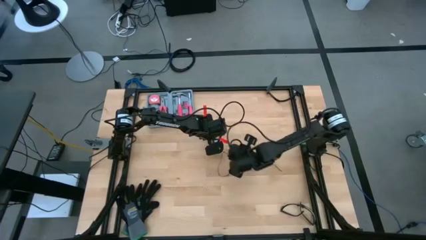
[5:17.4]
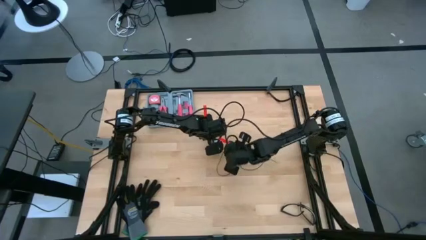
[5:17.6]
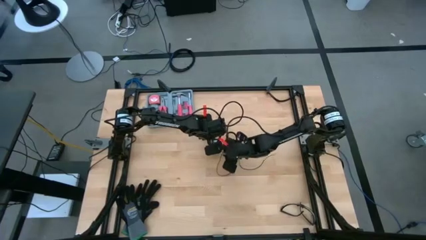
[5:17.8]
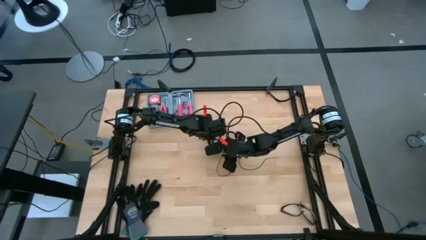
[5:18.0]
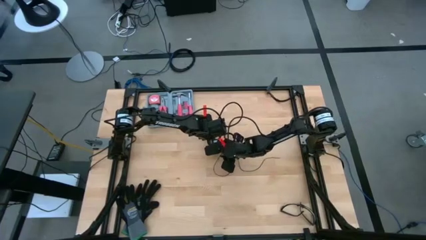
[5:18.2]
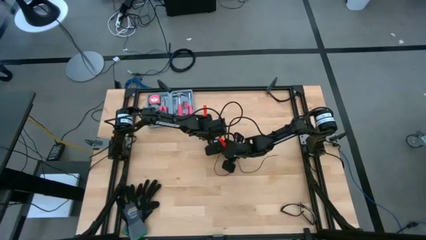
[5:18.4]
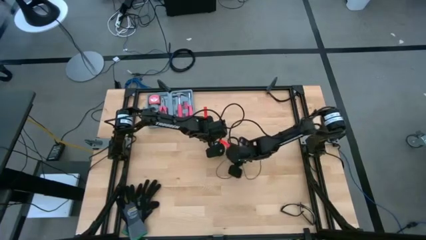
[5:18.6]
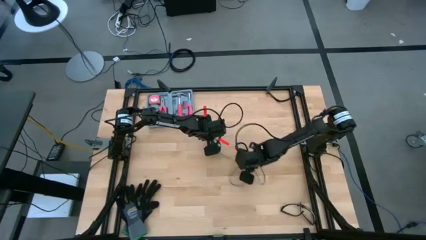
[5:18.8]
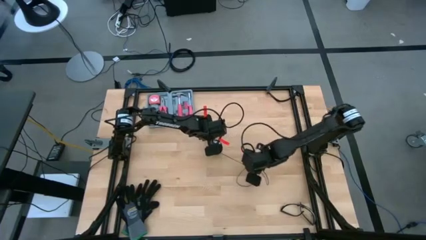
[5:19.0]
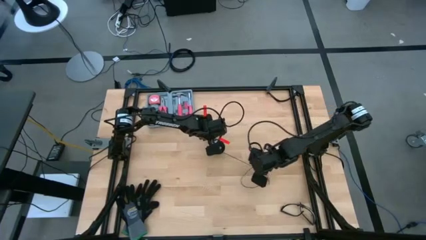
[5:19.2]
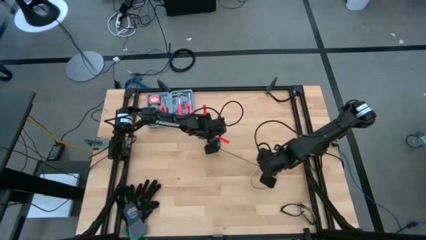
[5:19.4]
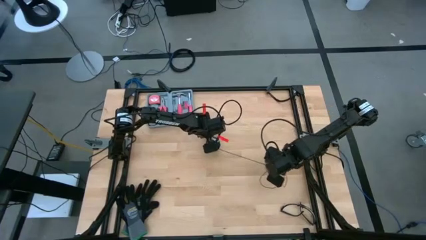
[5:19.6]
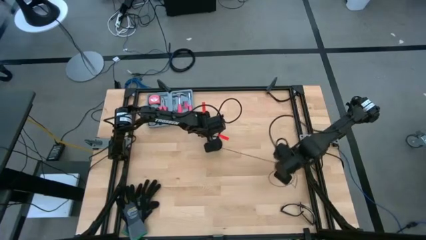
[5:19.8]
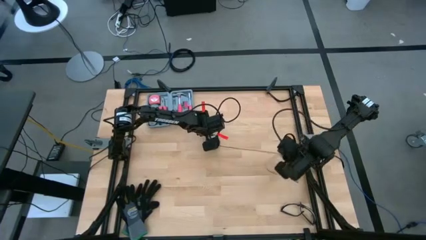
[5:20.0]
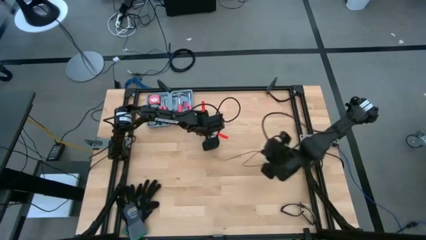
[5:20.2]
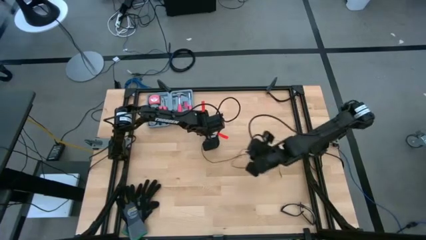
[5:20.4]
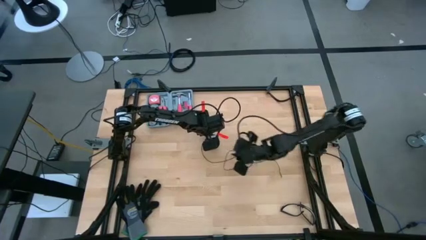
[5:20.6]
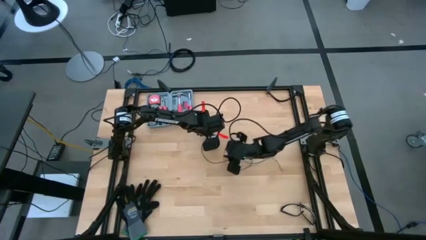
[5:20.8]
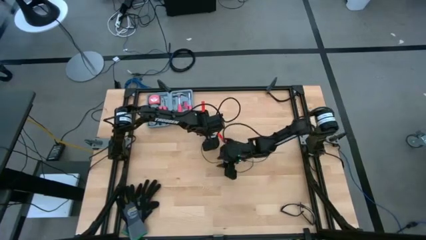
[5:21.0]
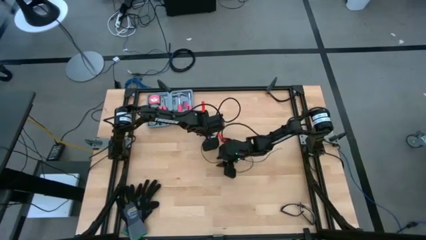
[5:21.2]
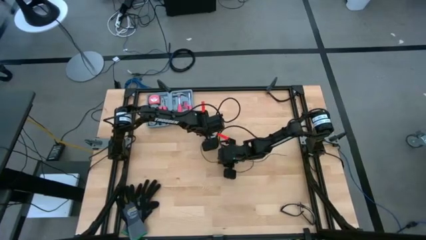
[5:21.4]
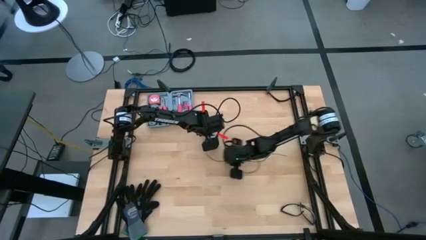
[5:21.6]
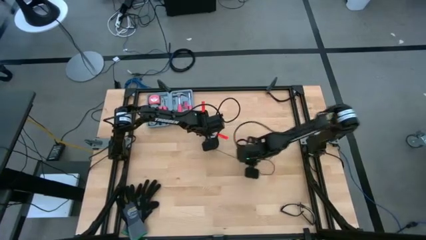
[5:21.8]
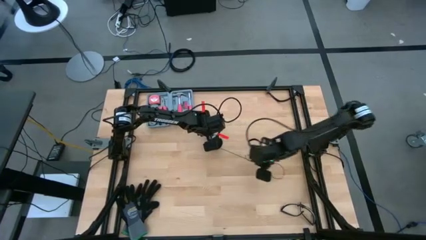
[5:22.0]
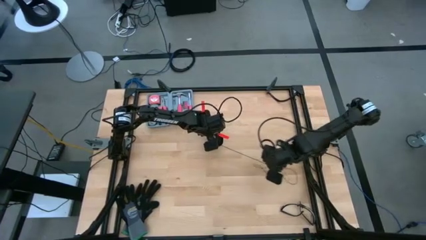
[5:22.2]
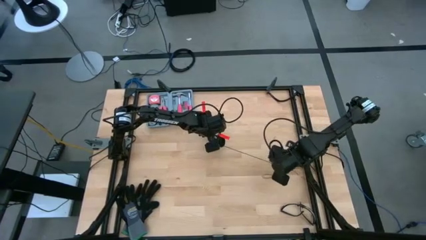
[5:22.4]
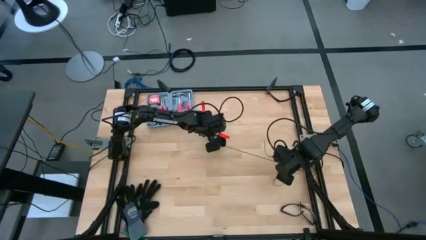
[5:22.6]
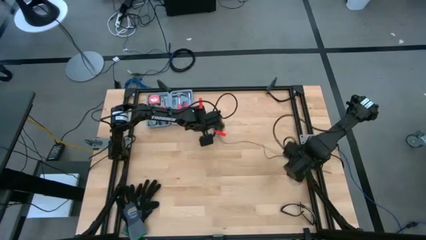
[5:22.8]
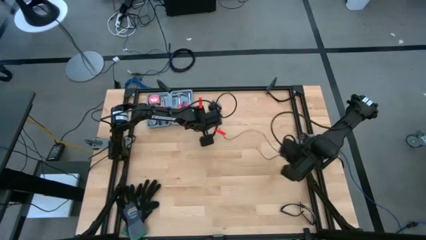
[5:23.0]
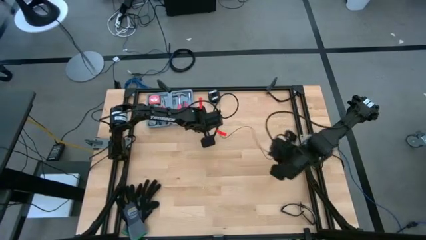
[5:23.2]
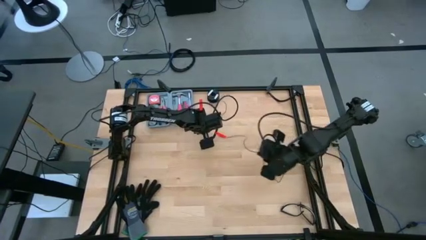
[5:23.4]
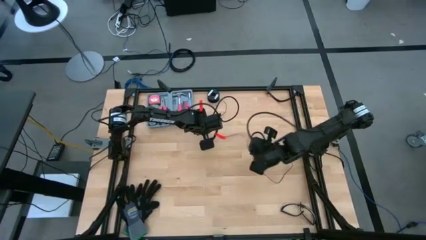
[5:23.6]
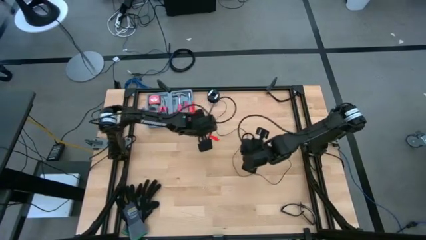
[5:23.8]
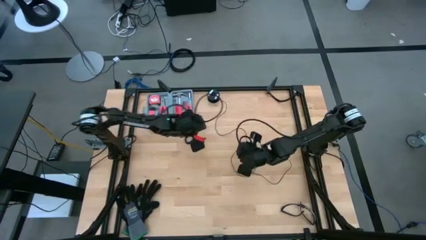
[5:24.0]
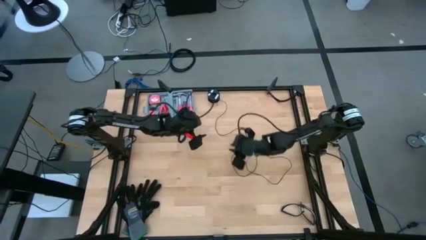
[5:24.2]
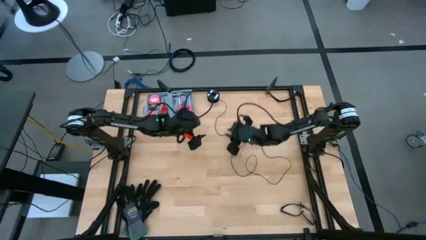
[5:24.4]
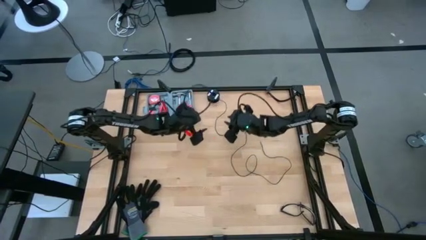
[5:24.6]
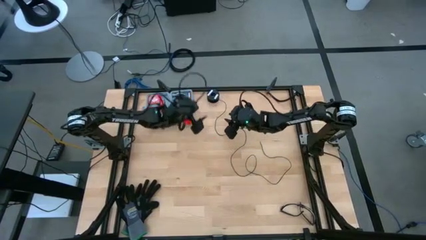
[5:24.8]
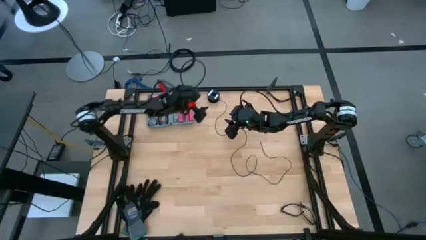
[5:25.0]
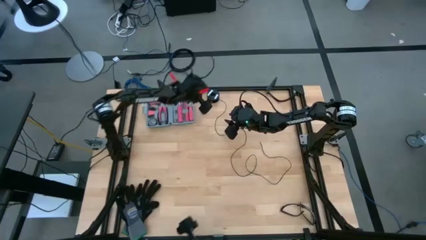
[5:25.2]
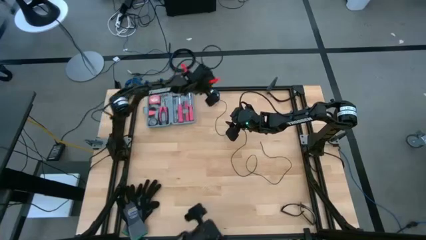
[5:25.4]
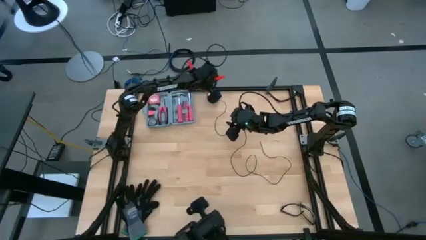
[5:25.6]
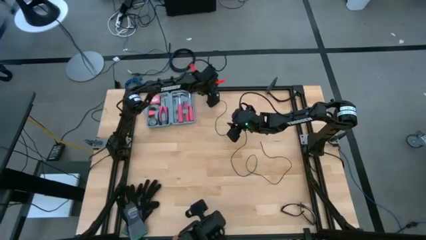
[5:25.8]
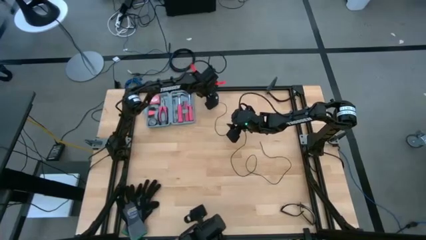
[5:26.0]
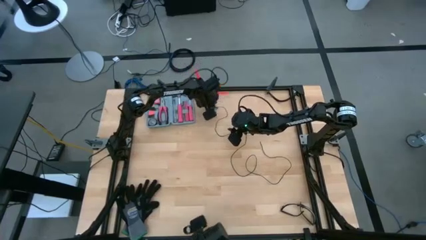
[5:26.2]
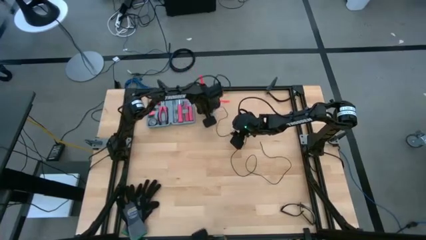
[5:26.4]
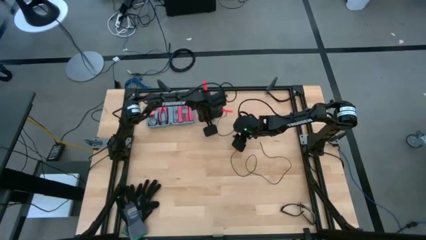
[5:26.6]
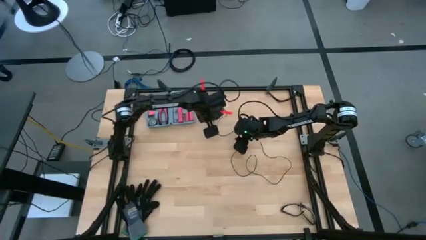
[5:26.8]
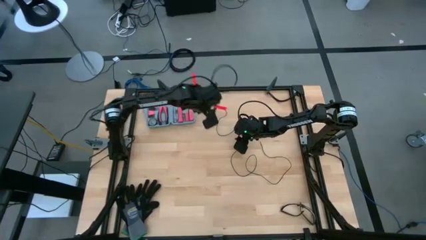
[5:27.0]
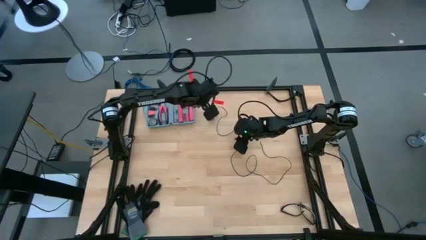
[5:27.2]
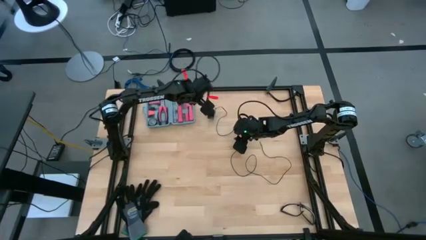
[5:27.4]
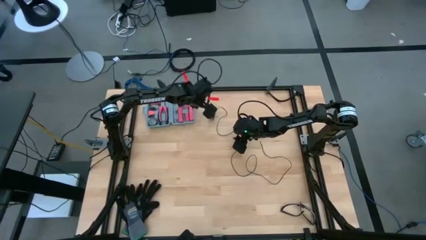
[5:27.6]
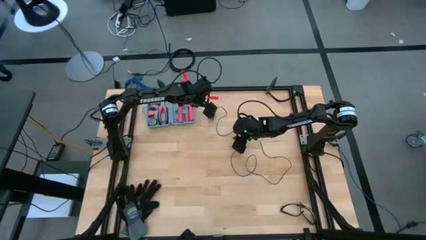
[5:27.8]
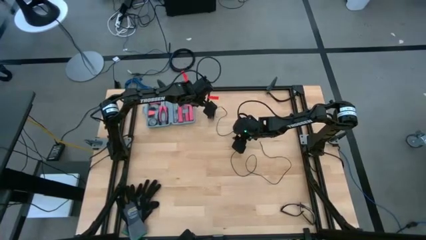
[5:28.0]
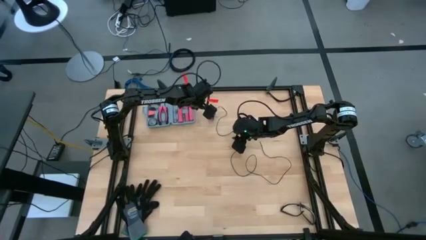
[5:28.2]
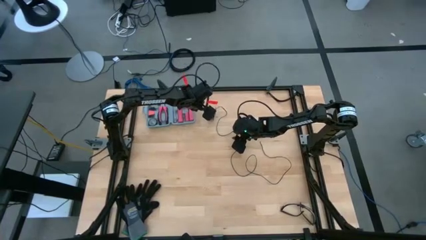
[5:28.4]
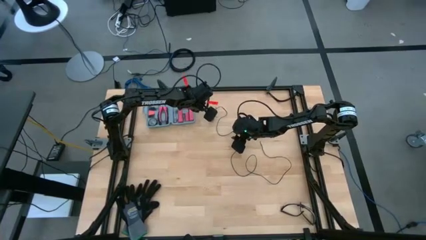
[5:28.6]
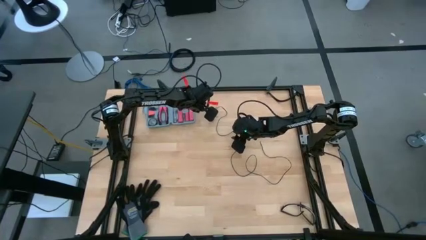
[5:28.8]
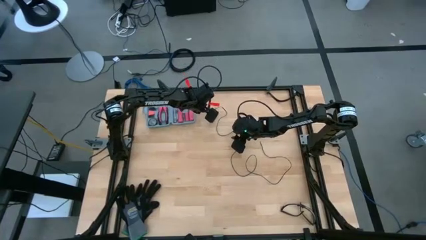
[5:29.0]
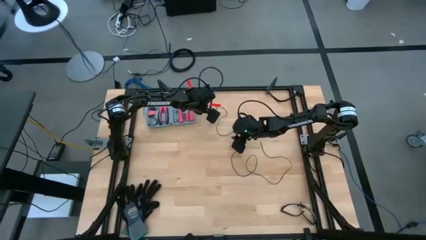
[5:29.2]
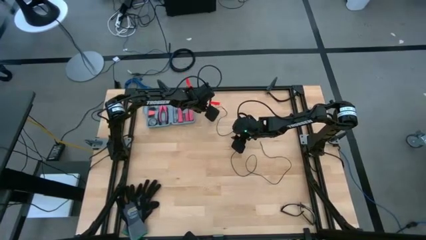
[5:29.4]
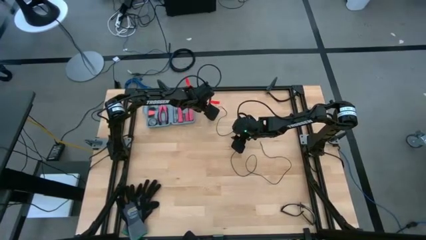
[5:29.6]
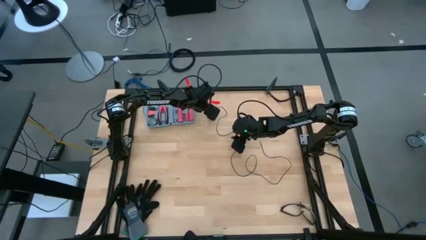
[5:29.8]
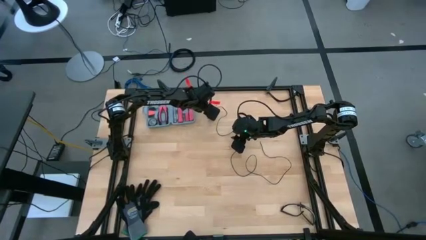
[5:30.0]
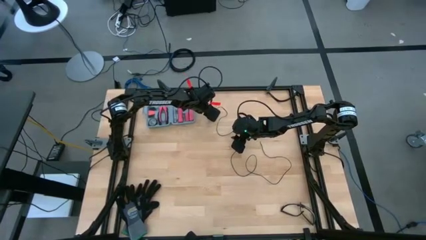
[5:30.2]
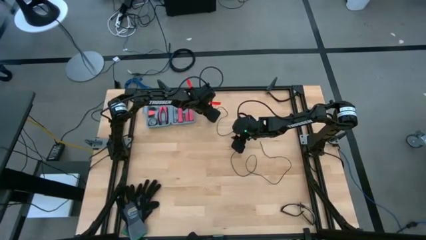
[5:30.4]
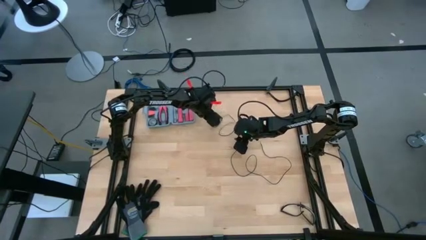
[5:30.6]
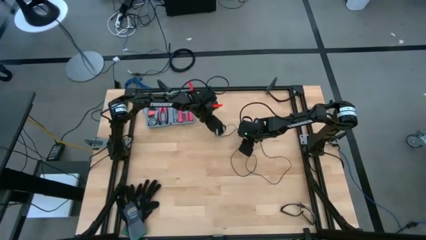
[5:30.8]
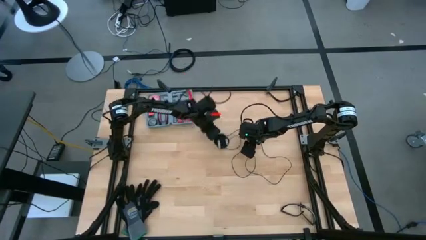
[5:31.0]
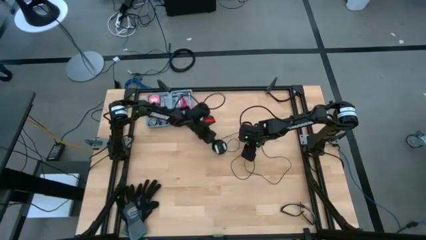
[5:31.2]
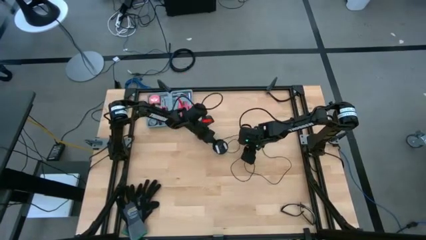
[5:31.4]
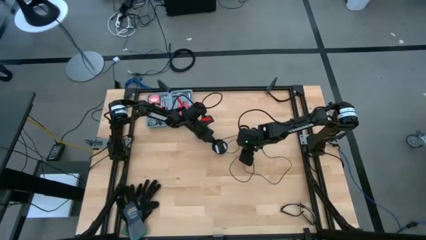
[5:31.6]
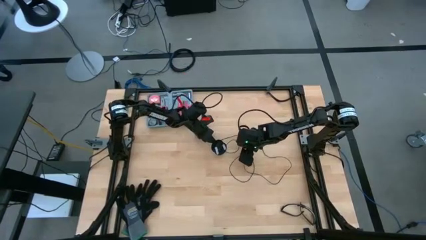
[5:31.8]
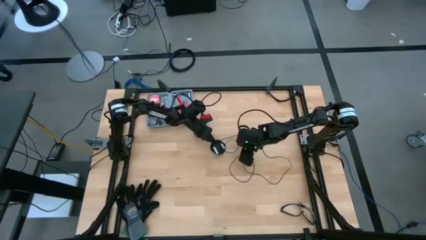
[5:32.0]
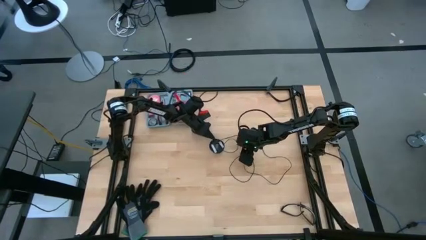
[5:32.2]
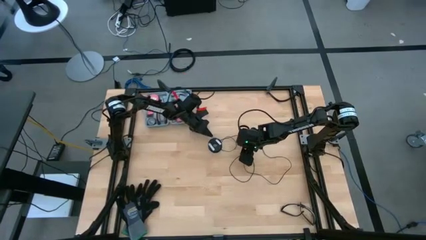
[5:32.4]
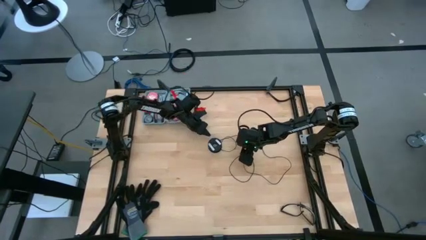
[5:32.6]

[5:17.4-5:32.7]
Task: Coil cords
Uncoil the black wire from the spool
